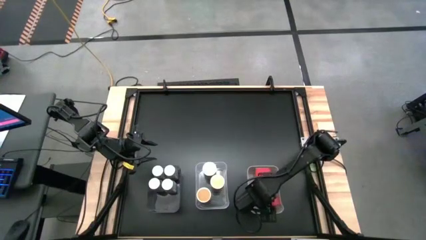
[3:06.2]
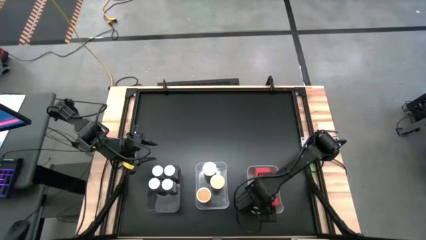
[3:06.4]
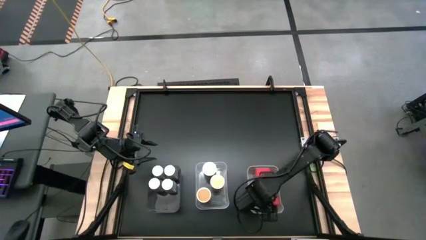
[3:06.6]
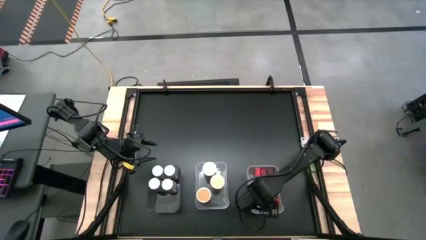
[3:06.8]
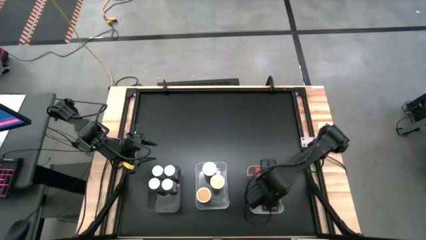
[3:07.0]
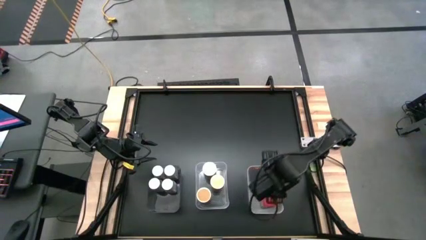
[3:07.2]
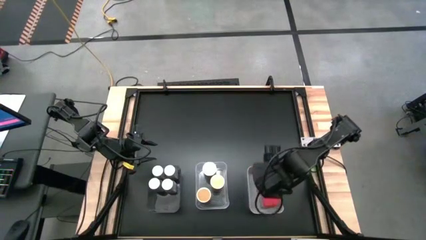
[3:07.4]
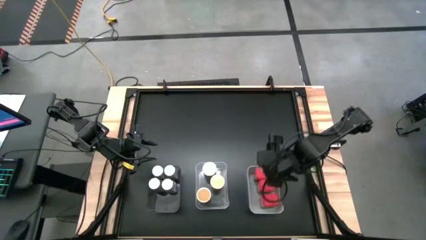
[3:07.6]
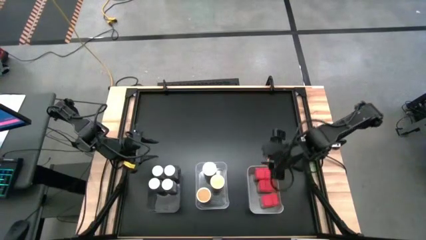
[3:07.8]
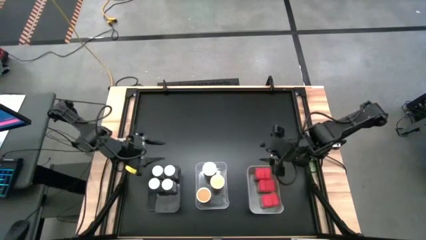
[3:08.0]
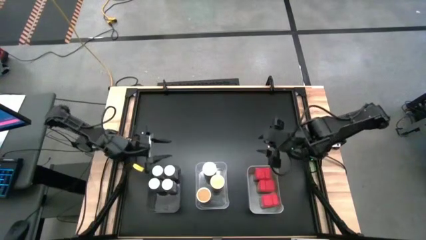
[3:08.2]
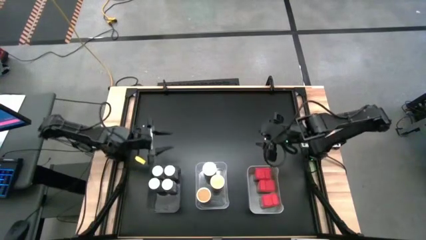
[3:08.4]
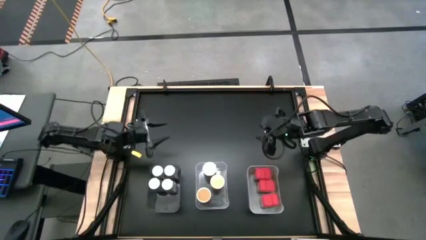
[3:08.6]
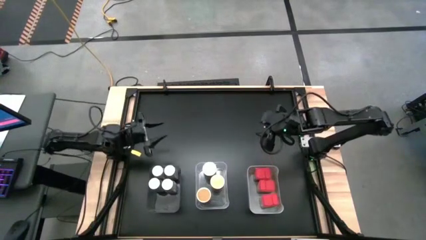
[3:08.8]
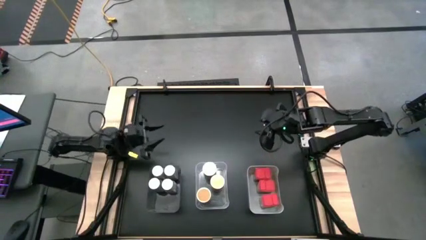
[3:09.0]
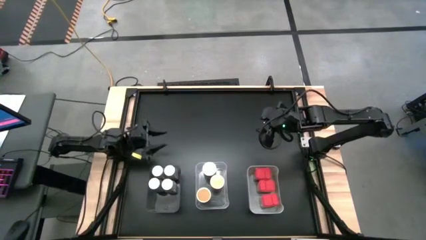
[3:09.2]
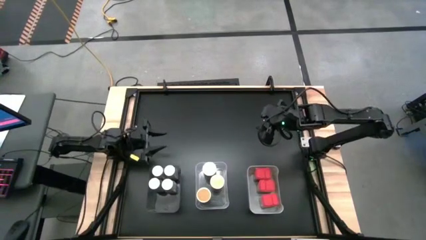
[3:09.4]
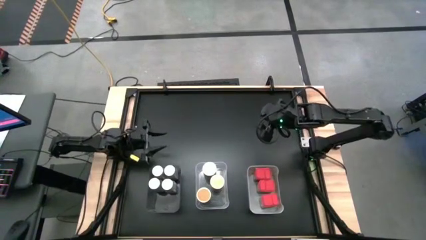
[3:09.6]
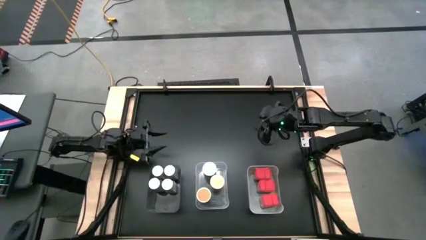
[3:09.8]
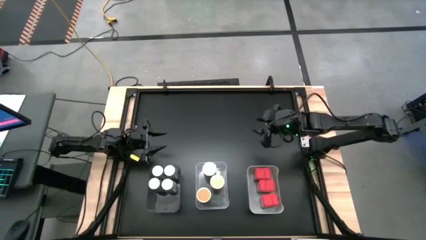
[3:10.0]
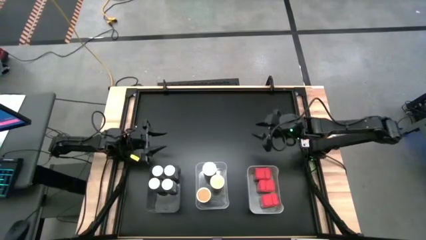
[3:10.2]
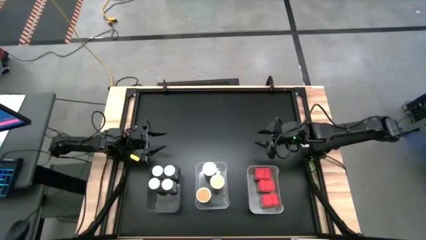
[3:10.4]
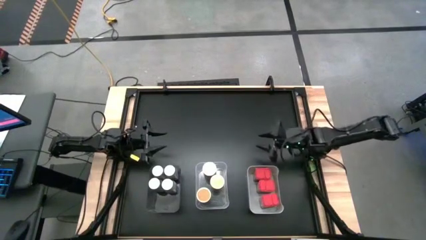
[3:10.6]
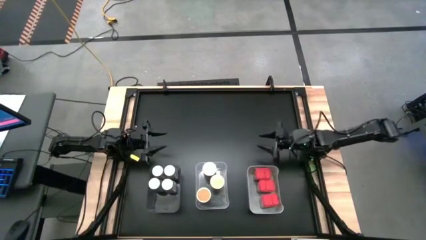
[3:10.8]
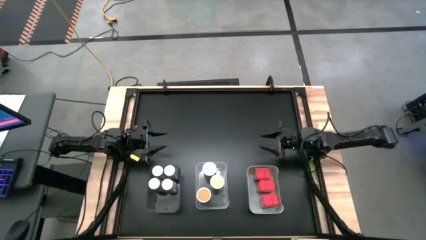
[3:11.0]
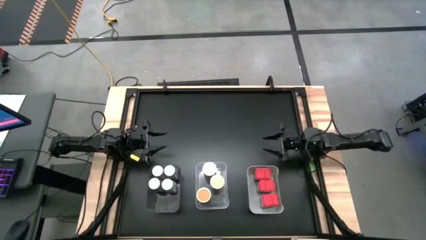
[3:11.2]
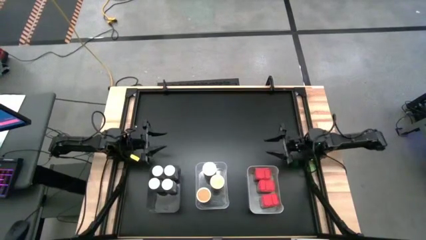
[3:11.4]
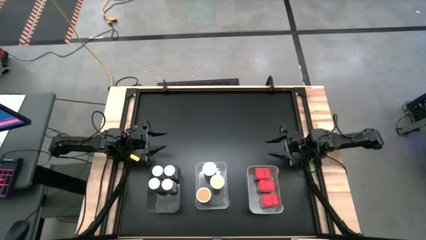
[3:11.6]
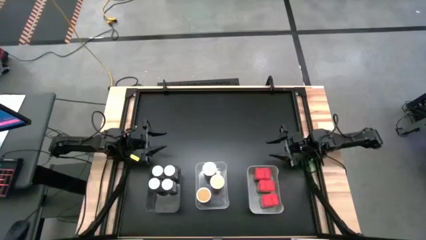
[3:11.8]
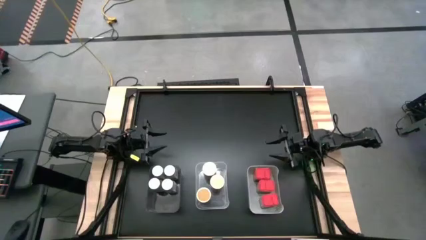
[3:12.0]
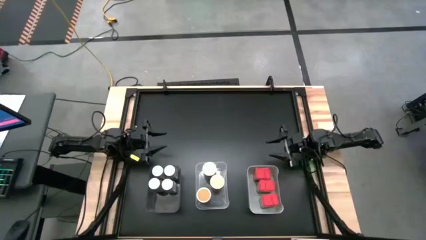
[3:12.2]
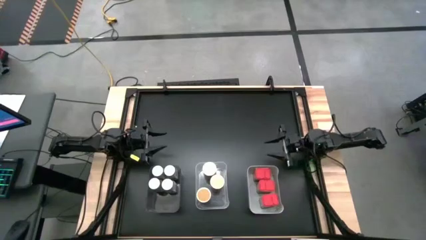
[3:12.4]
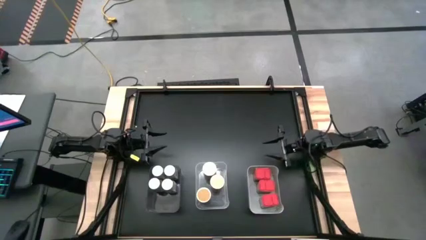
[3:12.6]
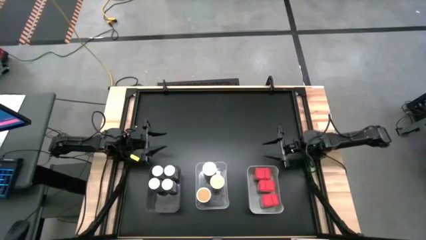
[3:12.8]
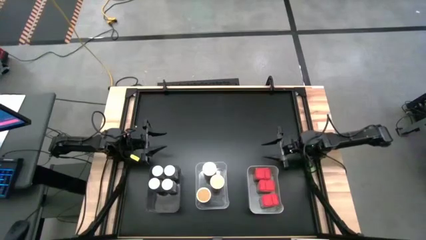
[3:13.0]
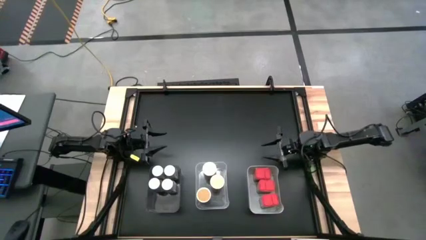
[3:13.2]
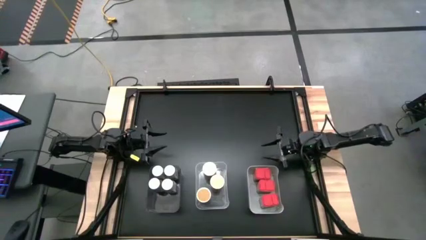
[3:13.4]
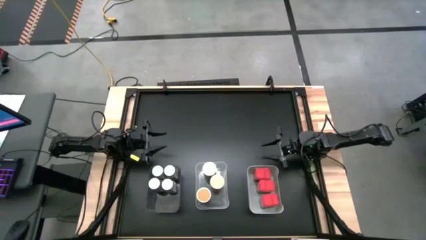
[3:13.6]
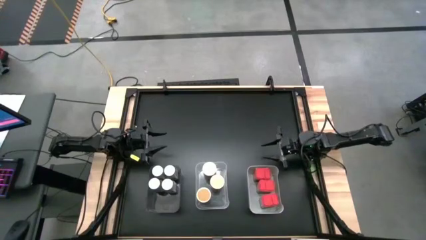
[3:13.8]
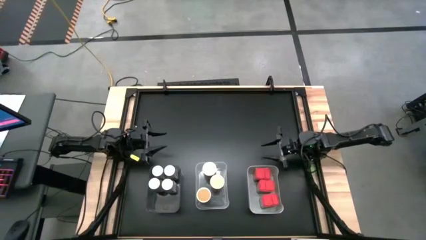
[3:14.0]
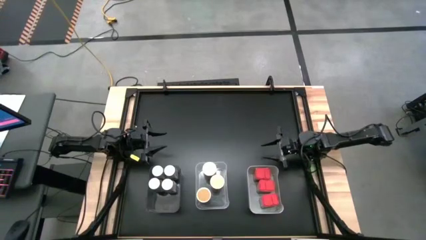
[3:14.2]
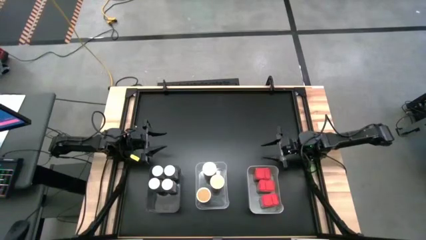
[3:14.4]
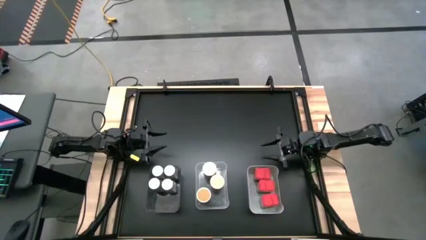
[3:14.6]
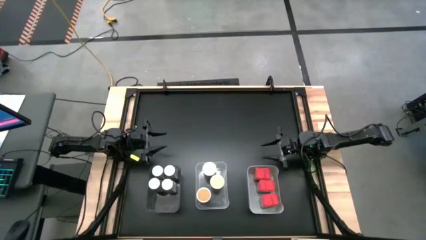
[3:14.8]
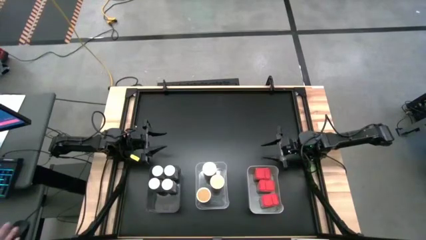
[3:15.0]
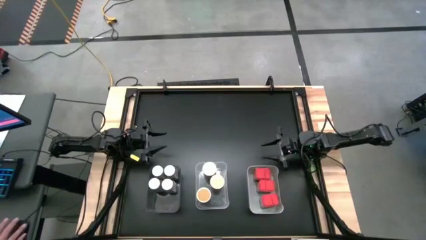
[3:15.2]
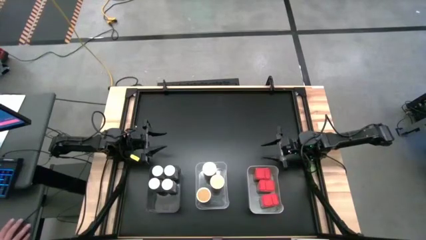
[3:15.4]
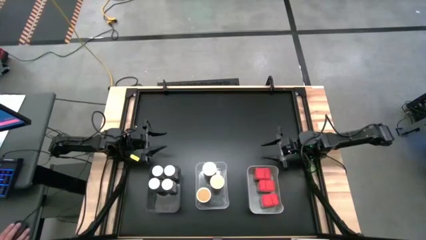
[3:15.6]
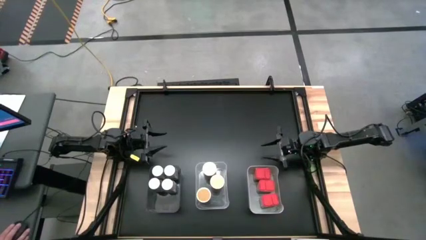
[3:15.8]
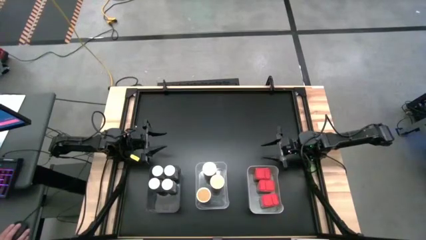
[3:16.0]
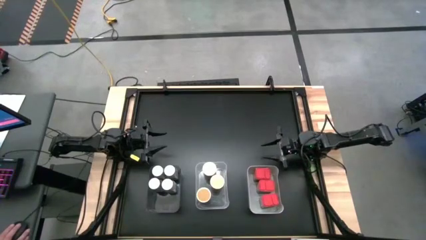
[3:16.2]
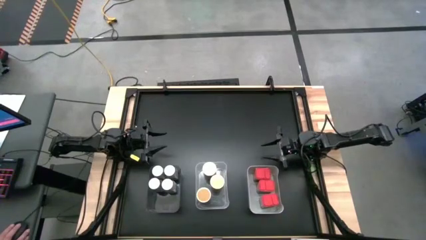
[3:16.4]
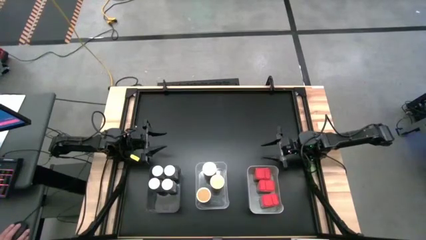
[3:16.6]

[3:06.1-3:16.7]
Task: Sort spices by type
Return to Home Position

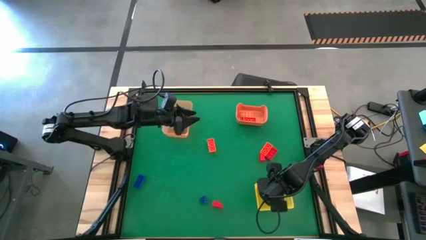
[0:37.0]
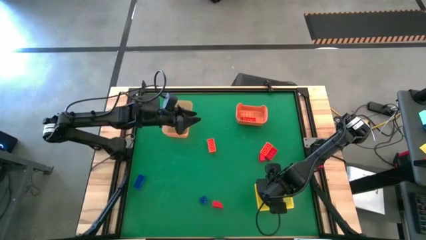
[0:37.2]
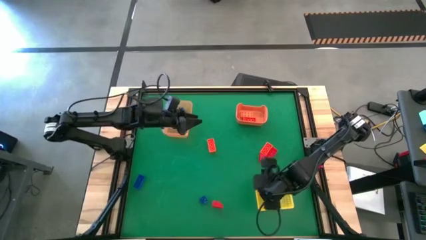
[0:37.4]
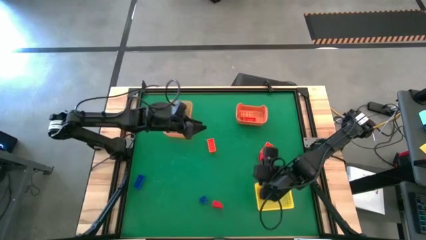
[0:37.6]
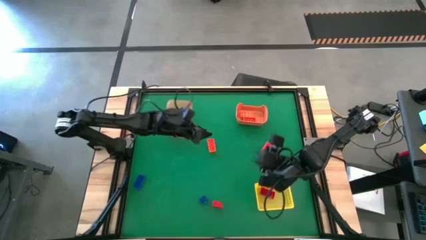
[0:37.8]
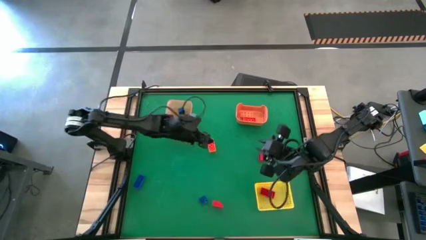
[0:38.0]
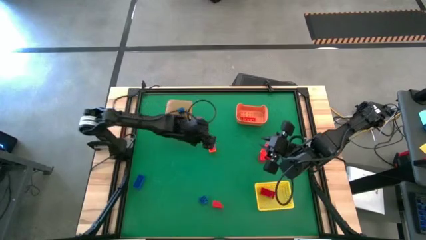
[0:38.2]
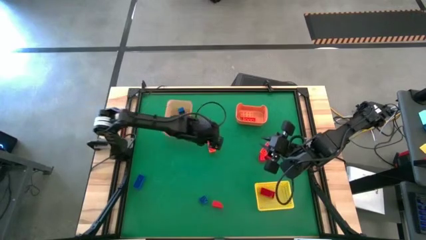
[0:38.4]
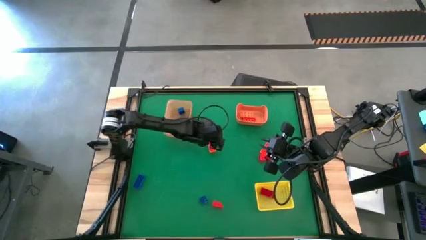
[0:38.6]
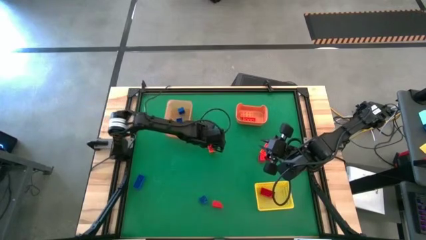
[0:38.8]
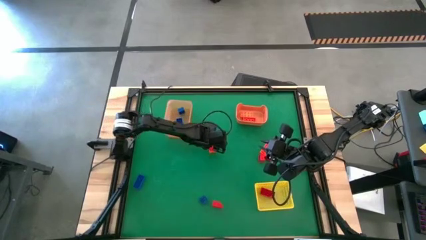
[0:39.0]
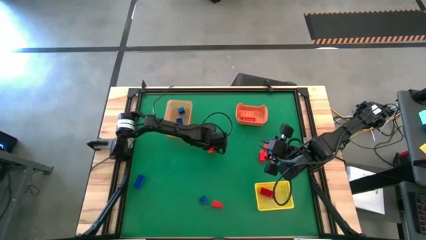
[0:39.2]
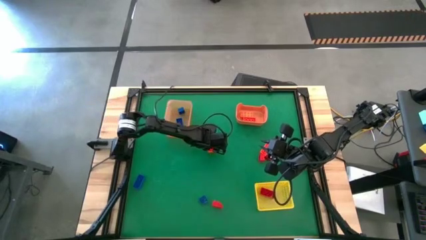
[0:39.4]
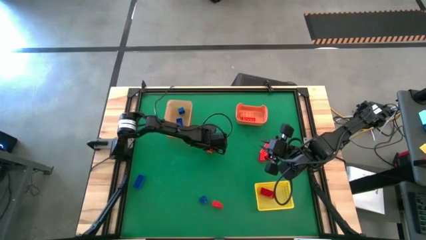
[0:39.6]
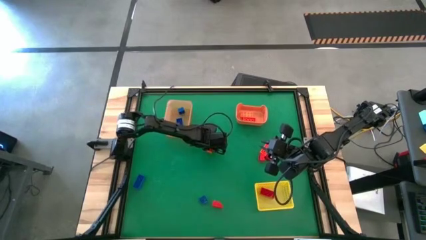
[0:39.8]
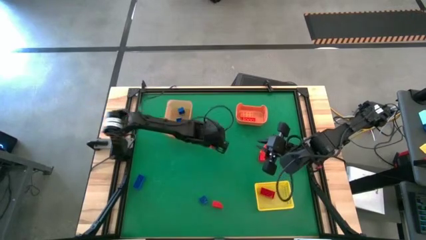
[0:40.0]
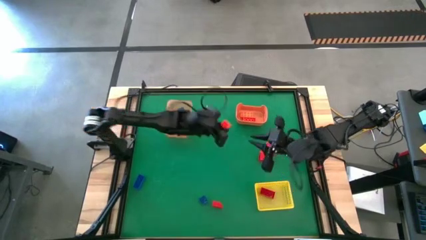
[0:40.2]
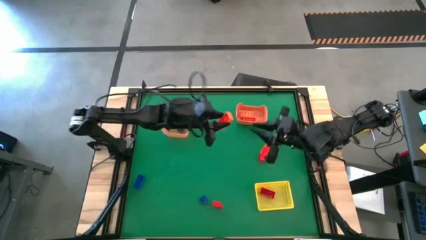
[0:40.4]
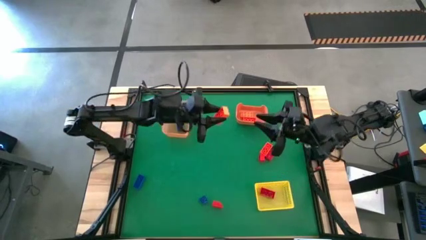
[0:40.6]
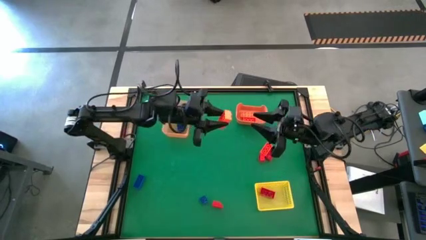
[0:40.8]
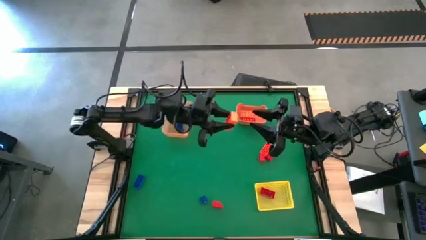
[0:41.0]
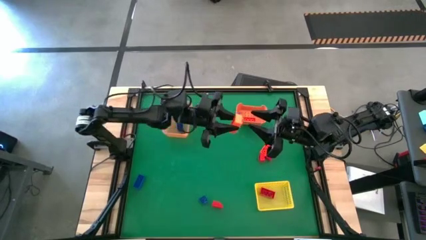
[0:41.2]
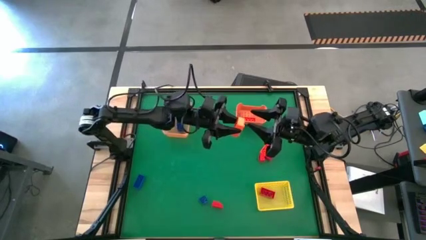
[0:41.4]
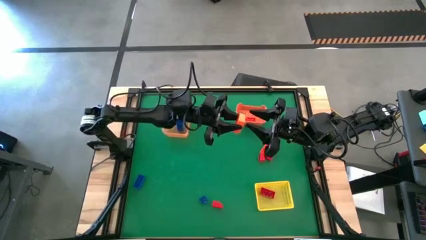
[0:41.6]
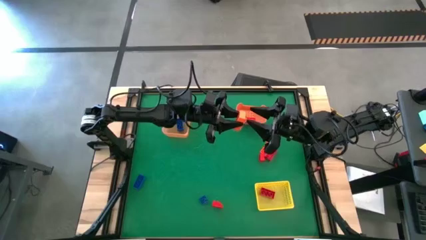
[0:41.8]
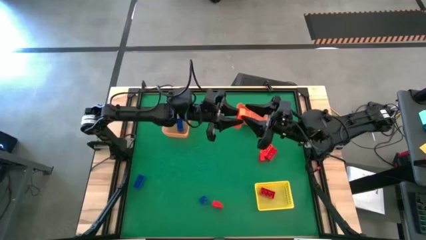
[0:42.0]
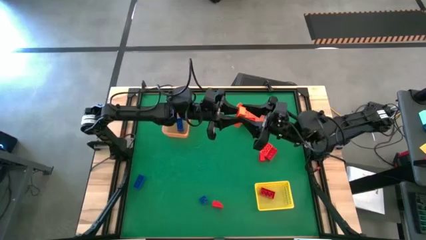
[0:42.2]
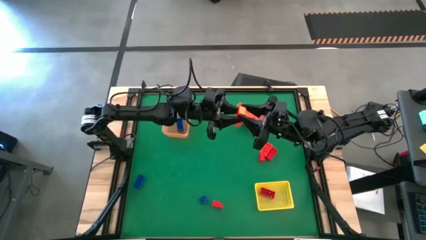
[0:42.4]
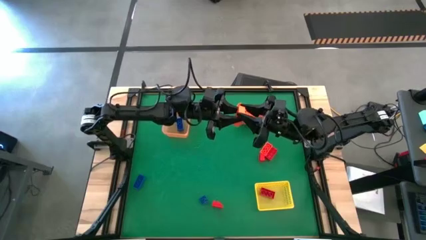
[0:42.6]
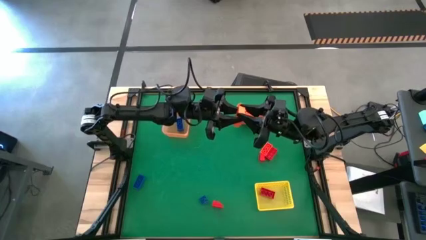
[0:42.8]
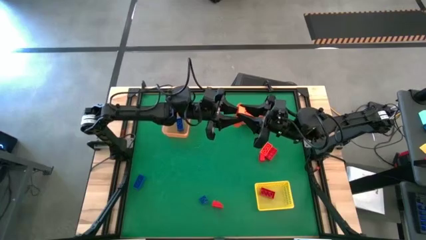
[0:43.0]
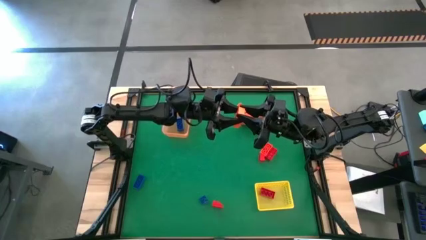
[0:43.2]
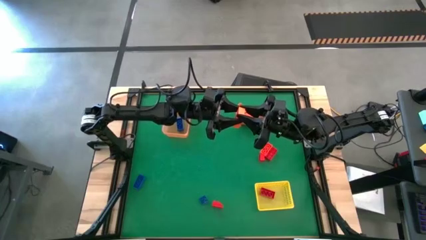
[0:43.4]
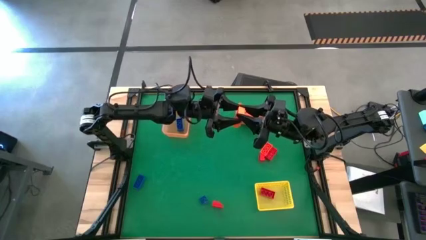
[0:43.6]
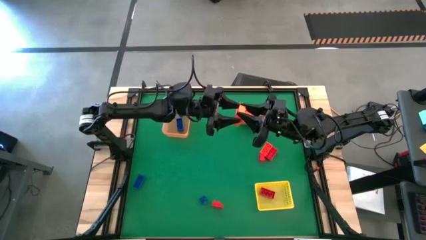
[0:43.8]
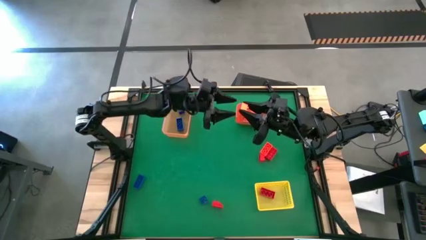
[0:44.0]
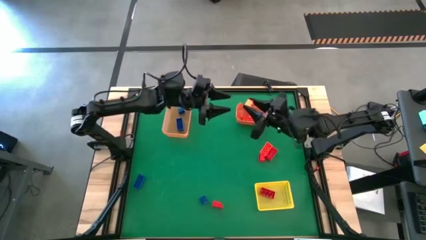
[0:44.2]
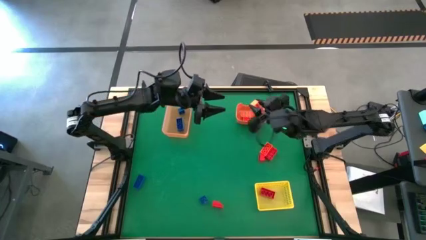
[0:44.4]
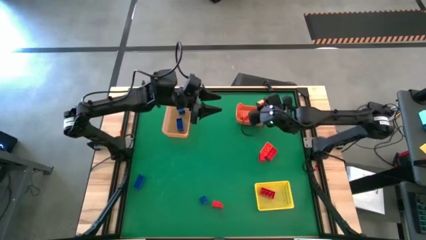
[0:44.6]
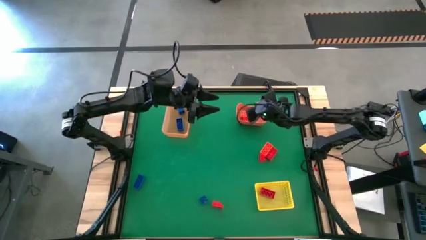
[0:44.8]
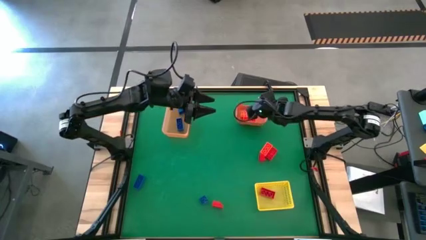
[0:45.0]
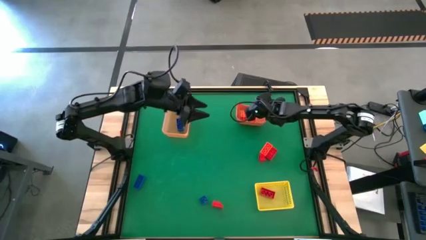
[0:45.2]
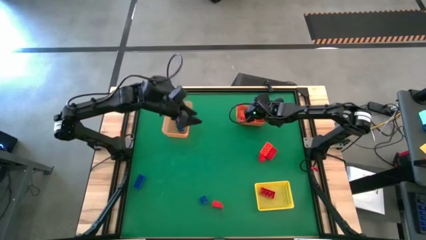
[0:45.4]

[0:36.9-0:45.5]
Task: Sort & place blocks by color
Put the orange game piece into the right orange bin
